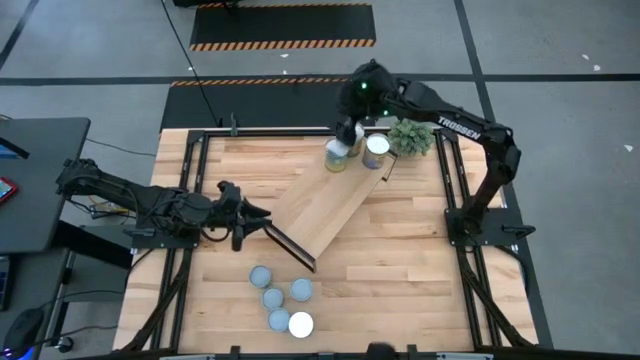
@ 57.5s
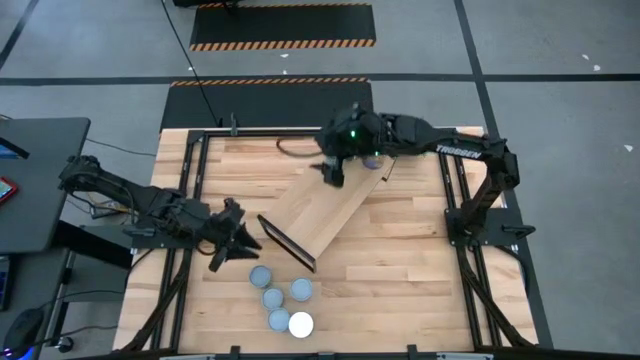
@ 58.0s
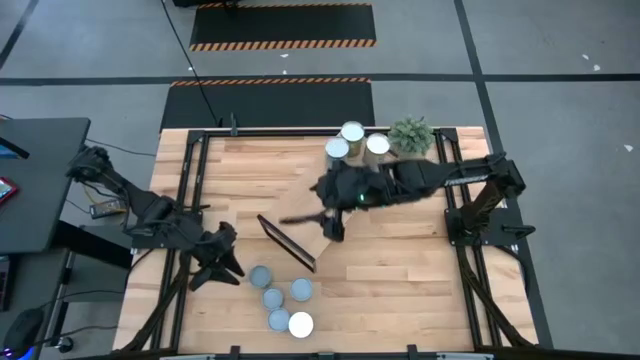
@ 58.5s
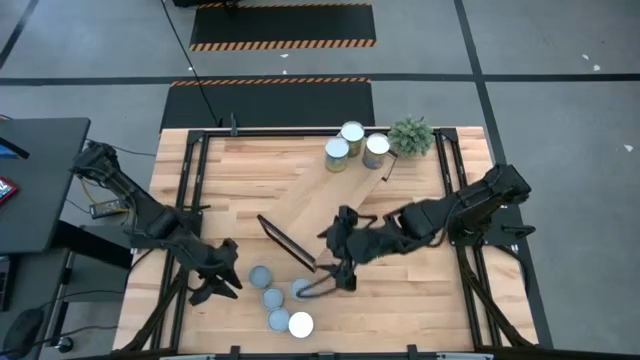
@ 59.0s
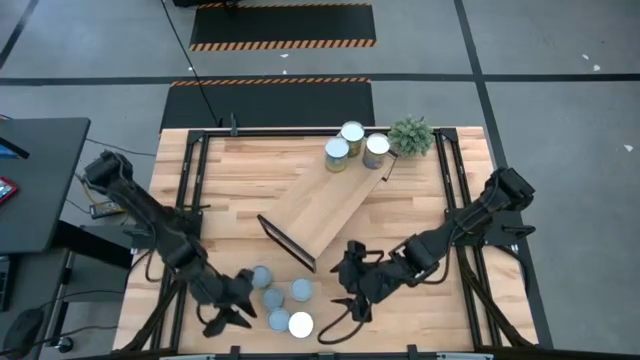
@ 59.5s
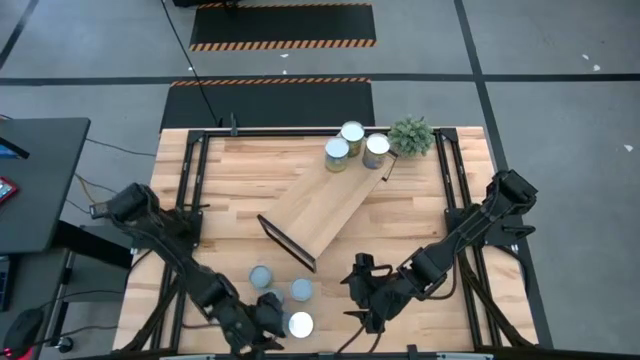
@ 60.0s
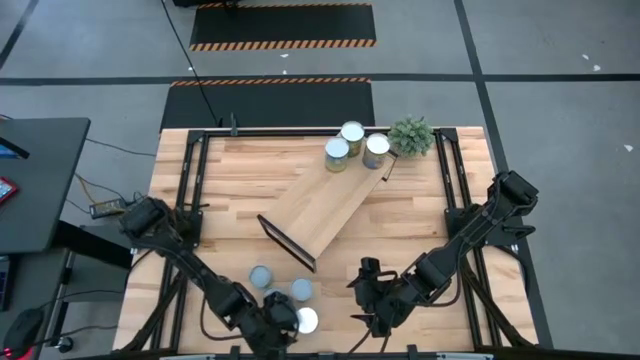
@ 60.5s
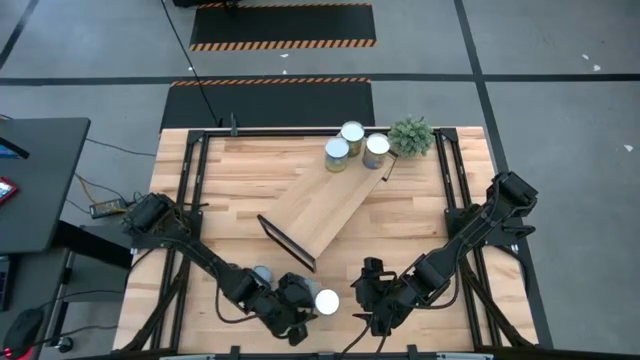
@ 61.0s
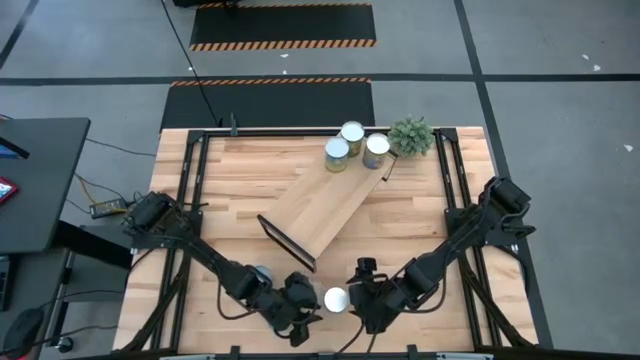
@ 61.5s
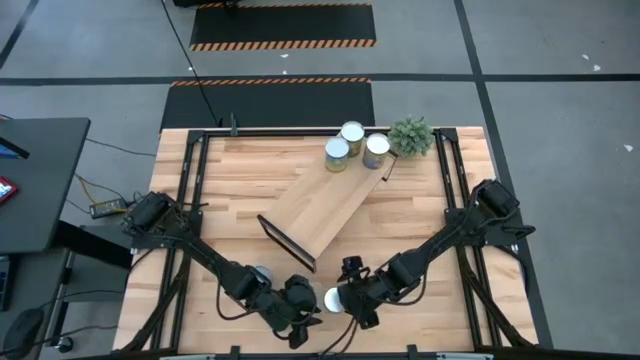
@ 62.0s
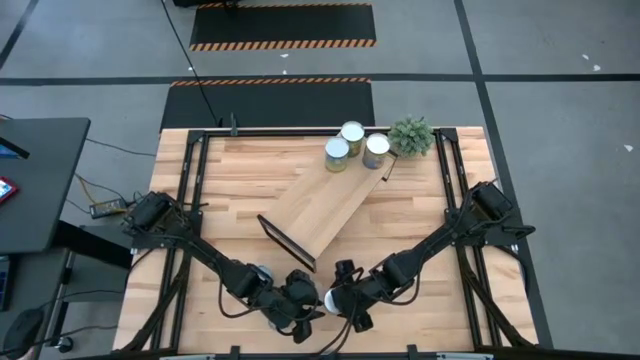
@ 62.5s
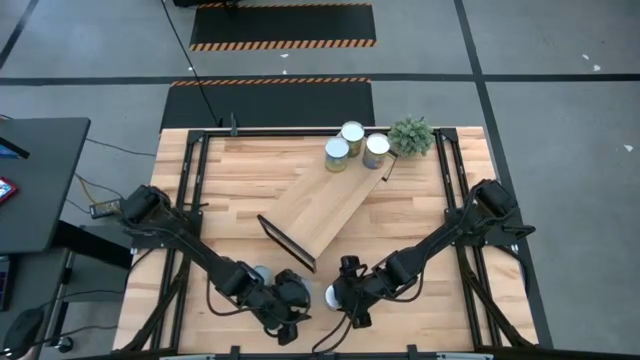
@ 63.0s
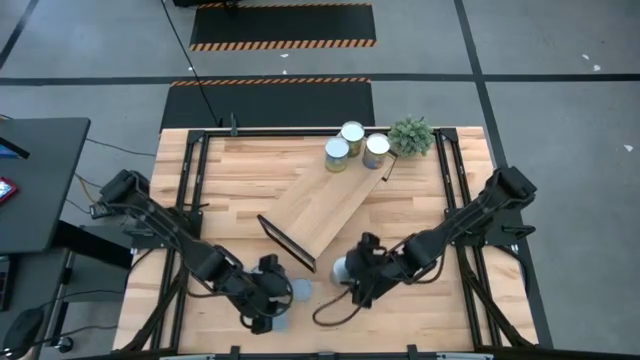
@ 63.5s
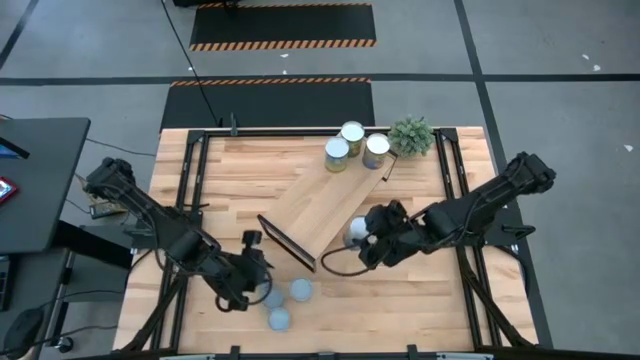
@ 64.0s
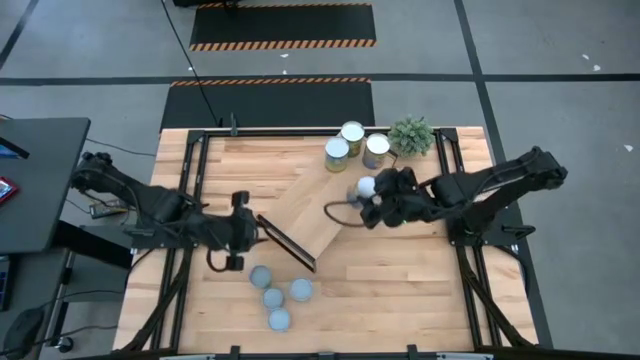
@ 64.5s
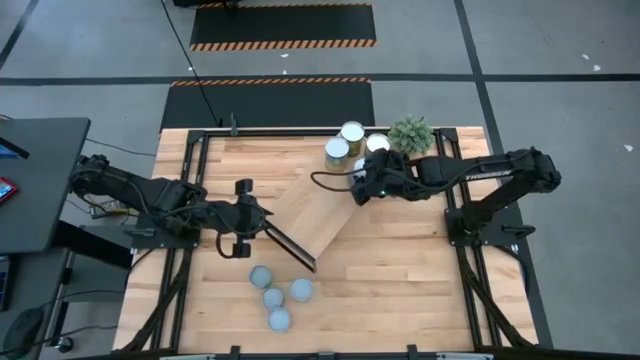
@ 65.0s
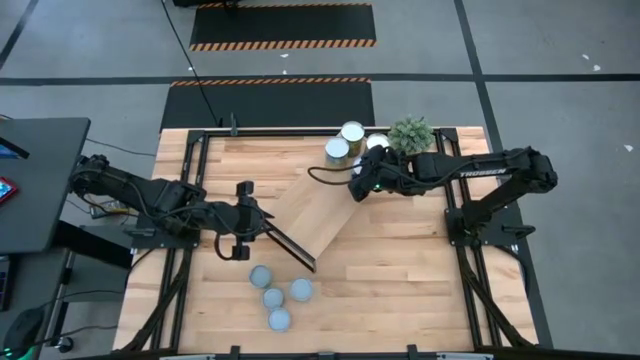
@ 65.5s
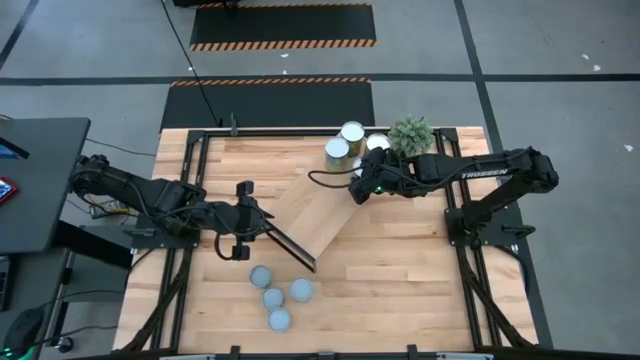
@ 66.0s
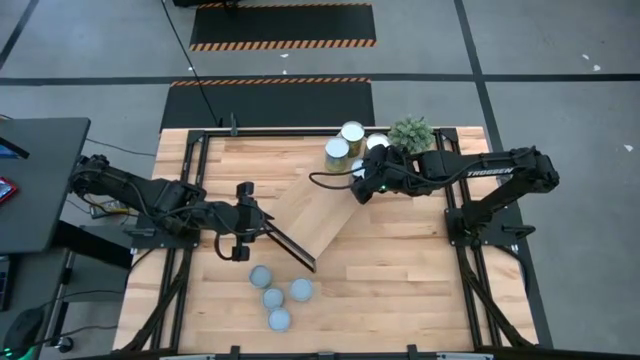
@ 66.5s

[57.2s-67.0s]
Task: Pick and place cans onto a shelf
Put the canned peas on the shelf

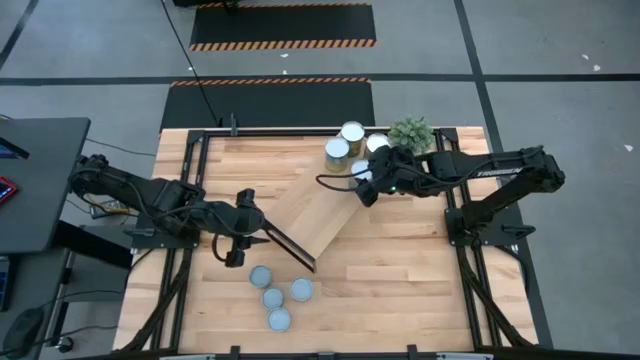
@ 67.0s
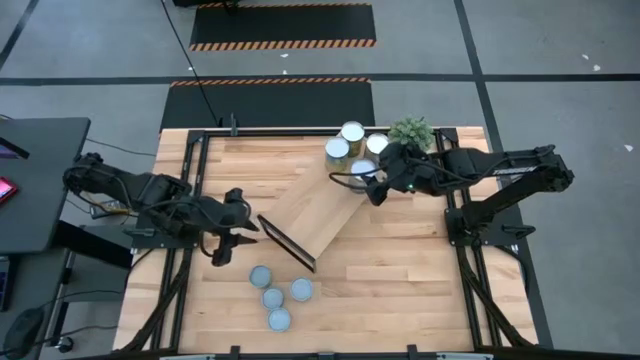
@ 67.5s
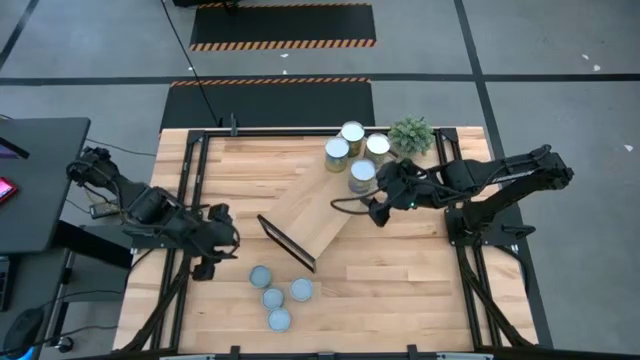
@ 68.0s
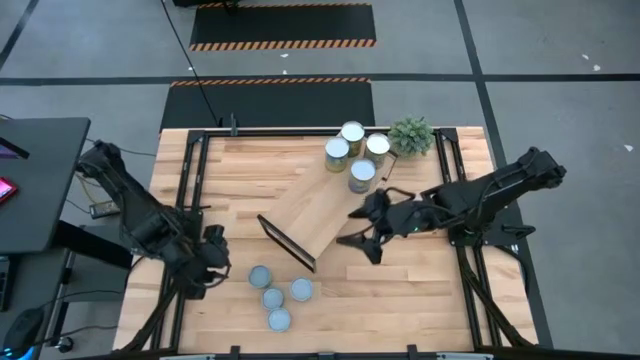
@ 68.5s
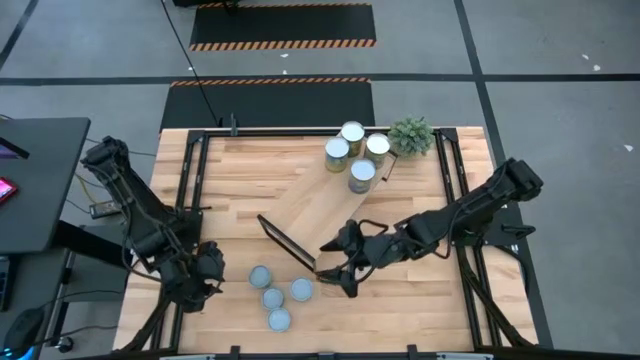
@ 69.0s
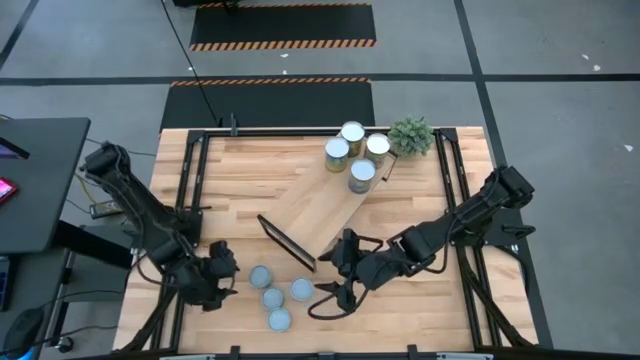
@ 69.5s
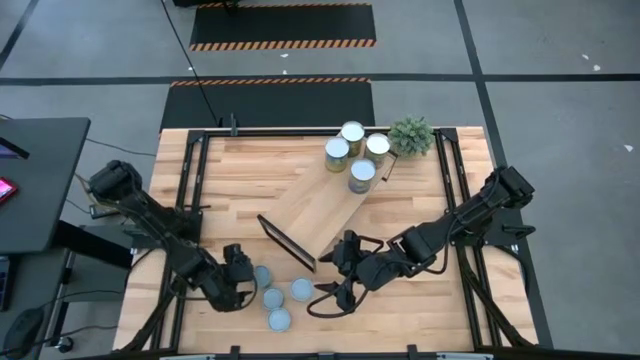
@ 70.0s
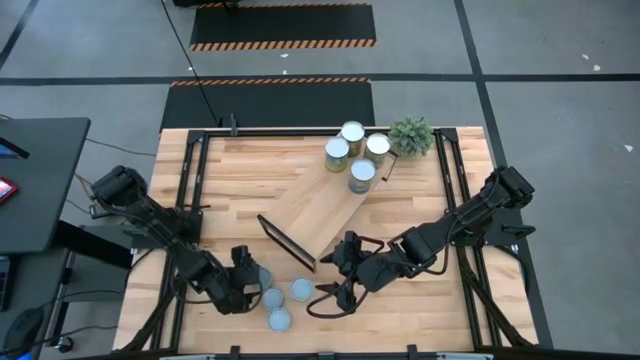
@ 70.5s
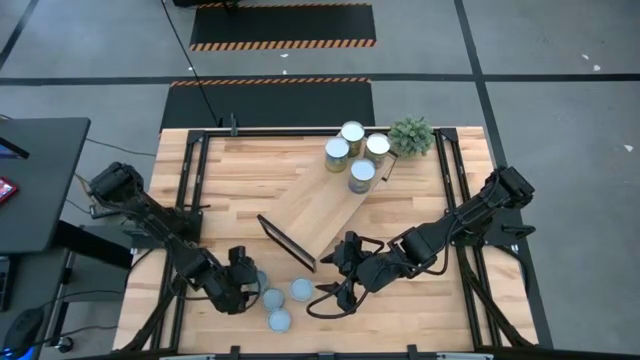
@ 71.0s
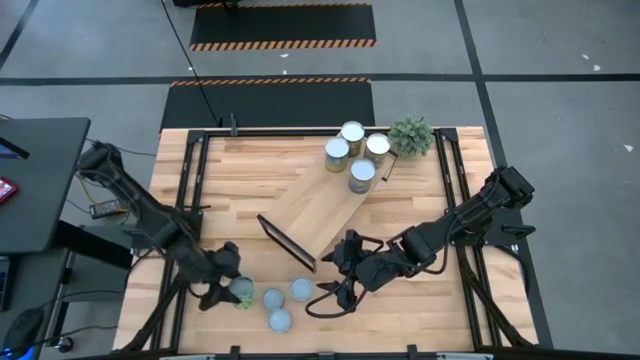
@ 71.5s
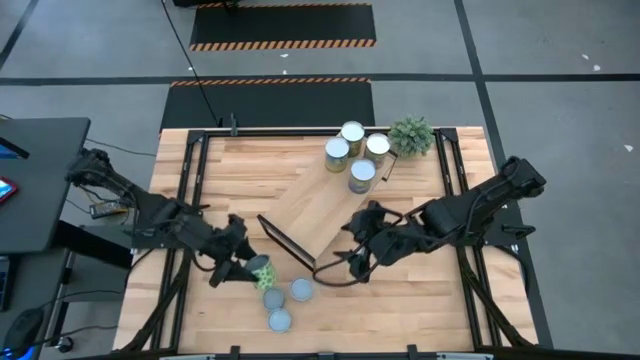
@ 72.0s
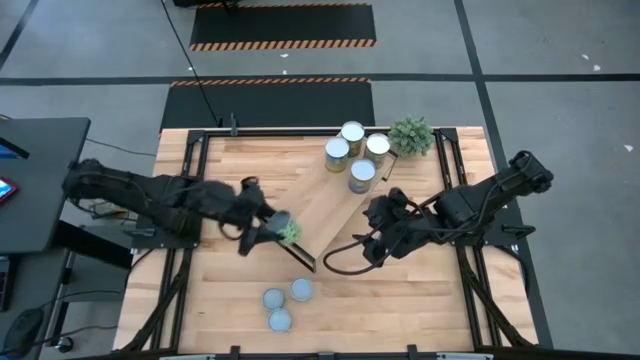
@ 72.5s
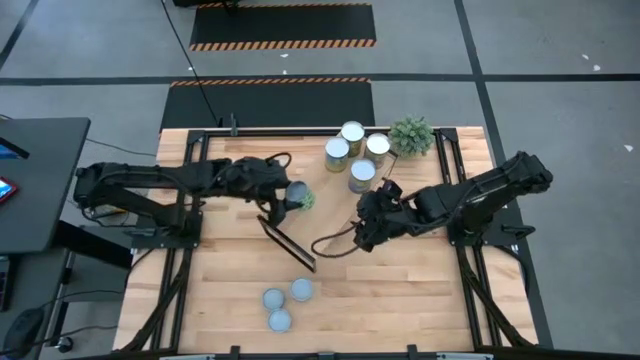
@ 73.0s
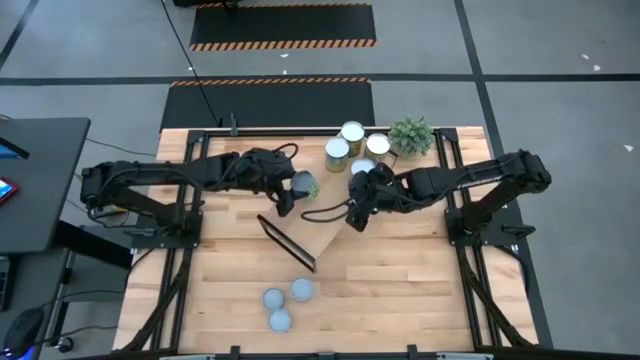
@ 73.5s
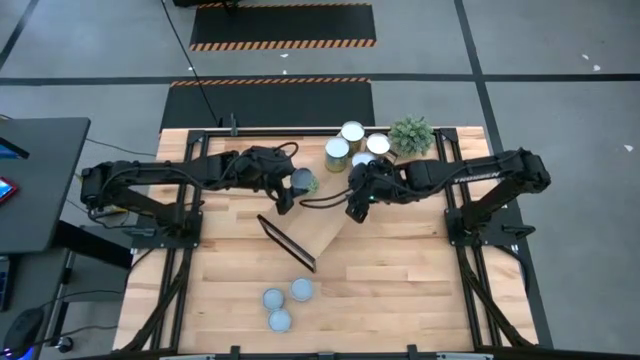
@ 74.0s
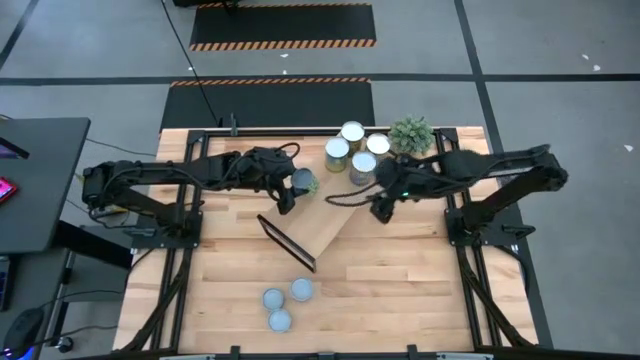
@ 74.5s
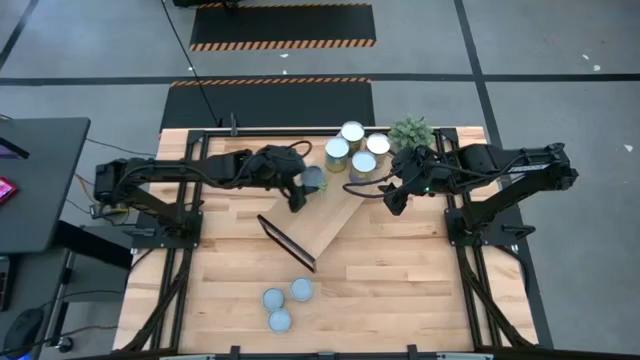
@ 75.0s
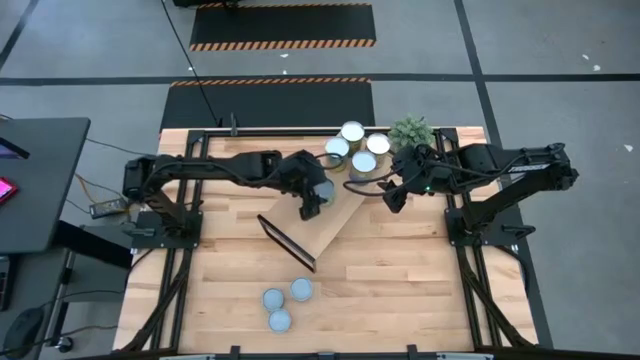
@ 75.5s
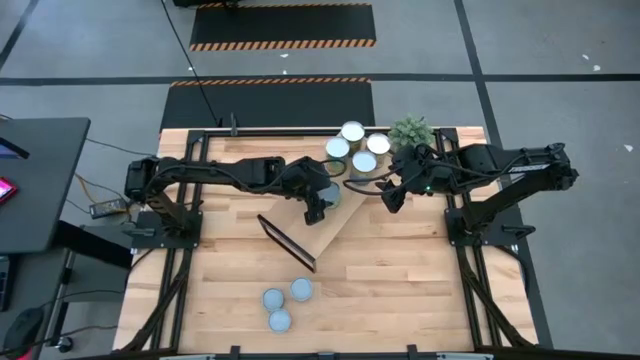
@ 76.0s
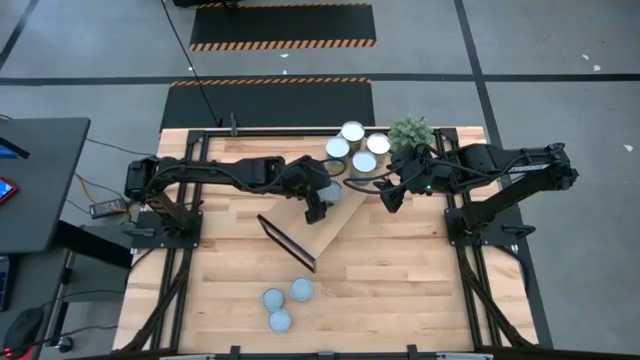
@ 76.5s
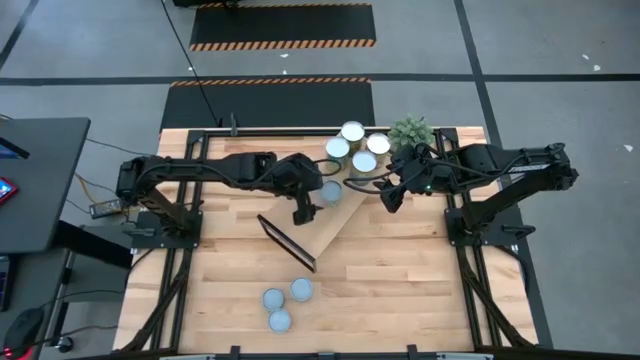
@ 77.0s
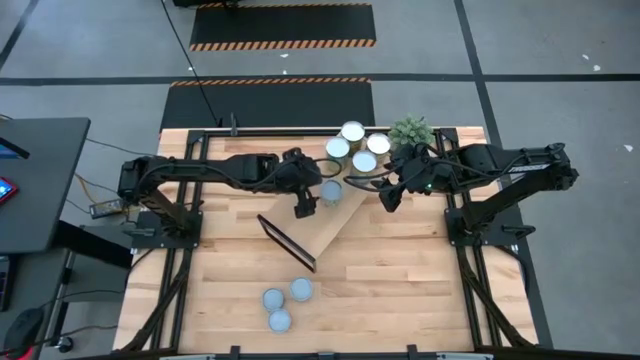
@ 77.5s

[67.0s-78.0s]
Put the canned green peas on the shelf
